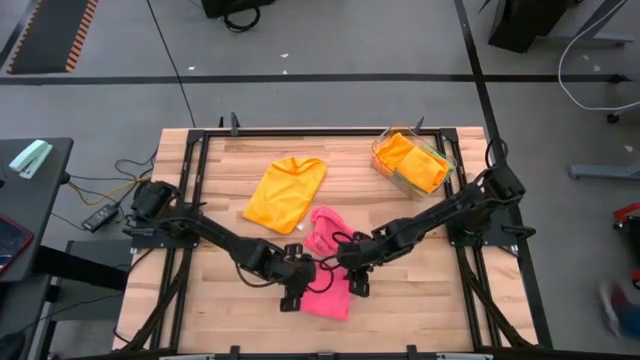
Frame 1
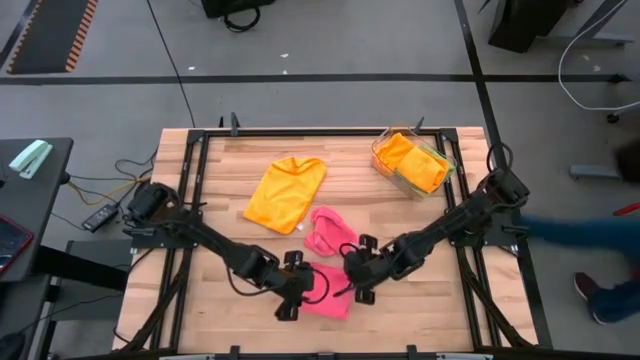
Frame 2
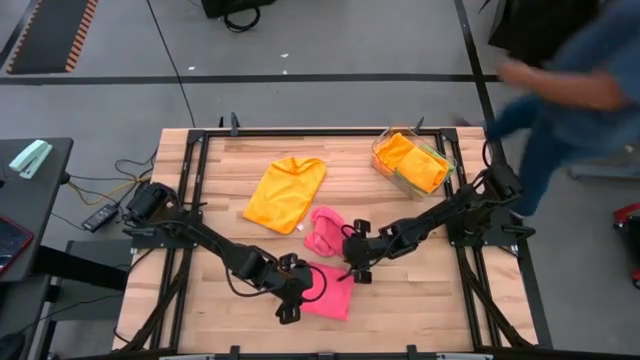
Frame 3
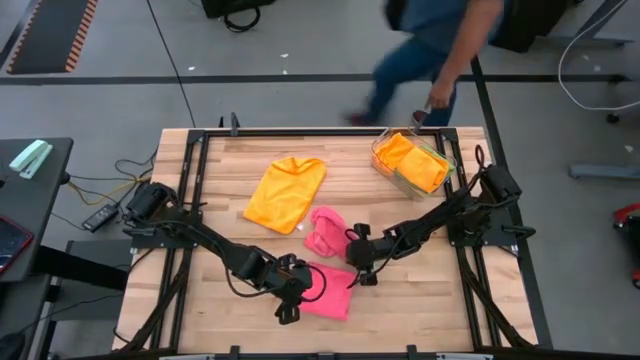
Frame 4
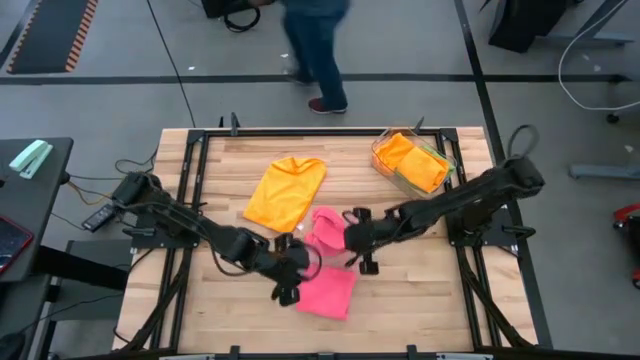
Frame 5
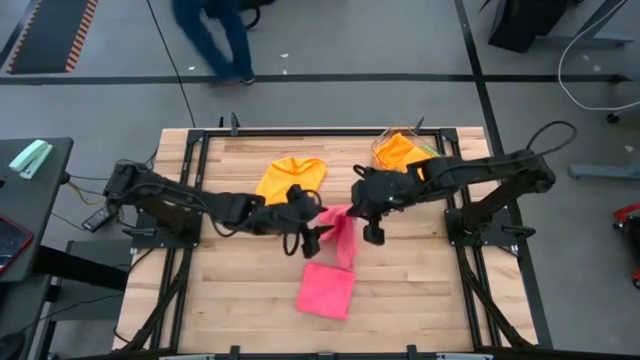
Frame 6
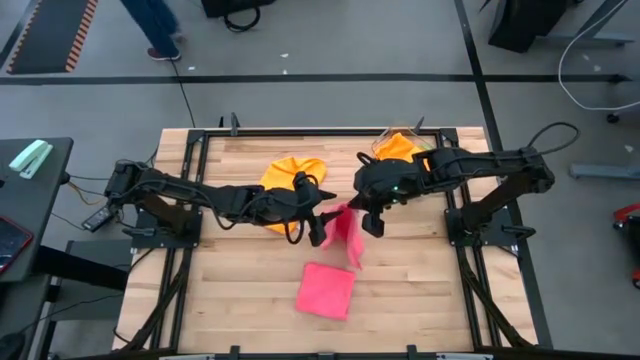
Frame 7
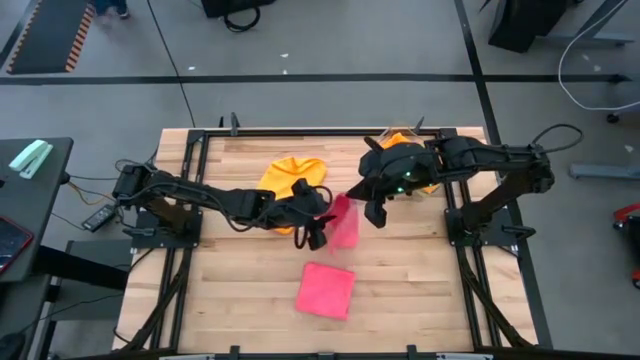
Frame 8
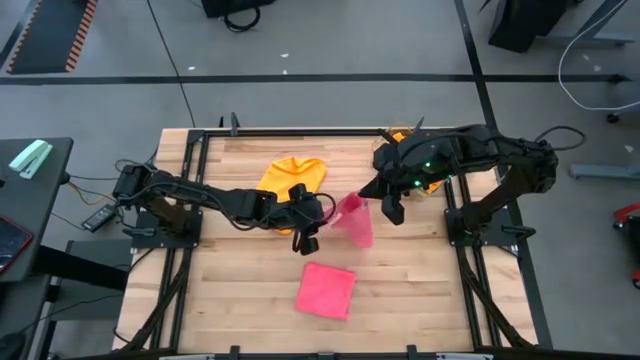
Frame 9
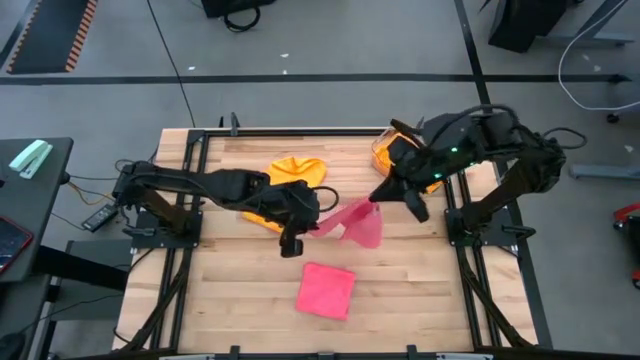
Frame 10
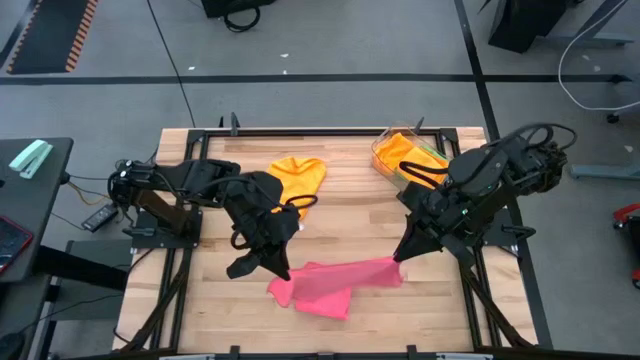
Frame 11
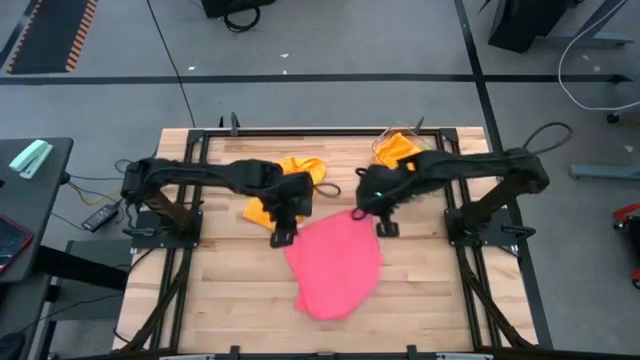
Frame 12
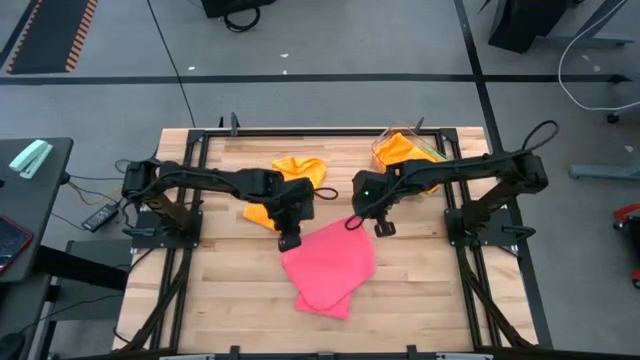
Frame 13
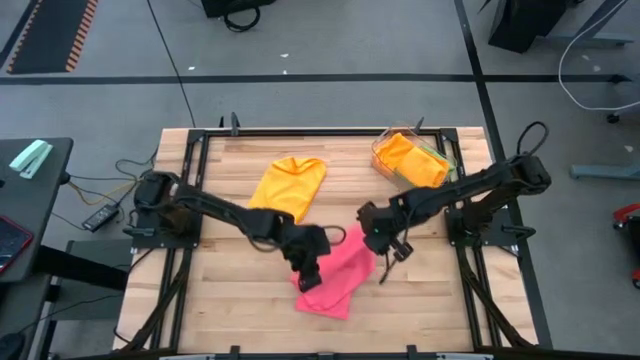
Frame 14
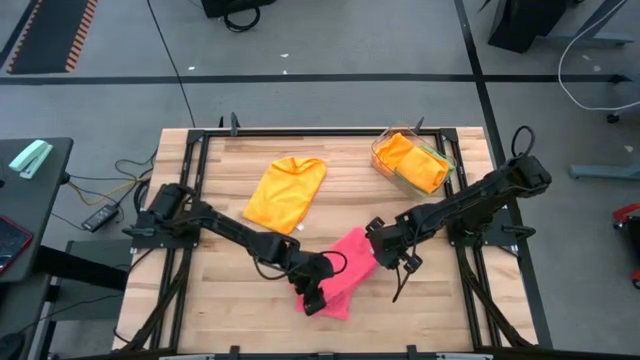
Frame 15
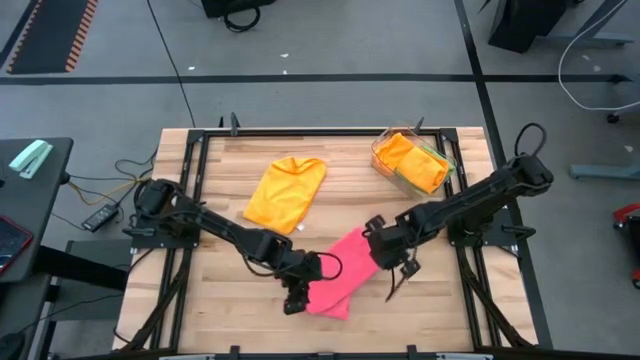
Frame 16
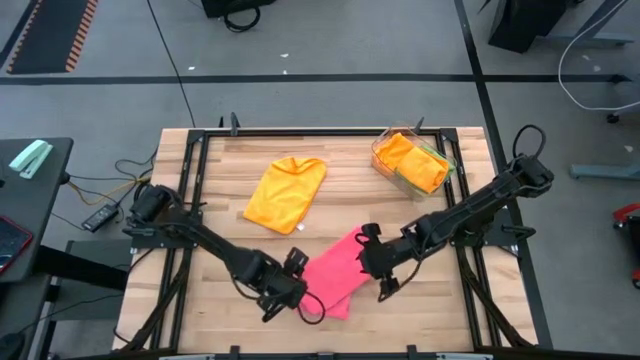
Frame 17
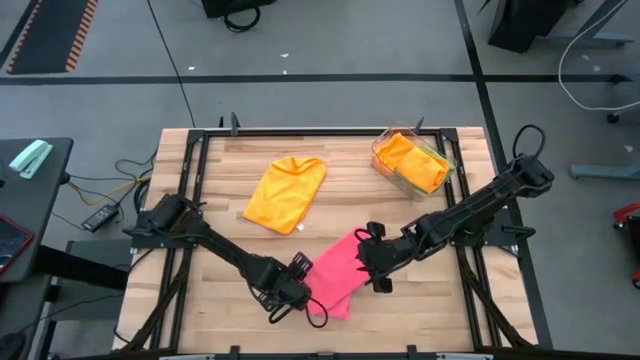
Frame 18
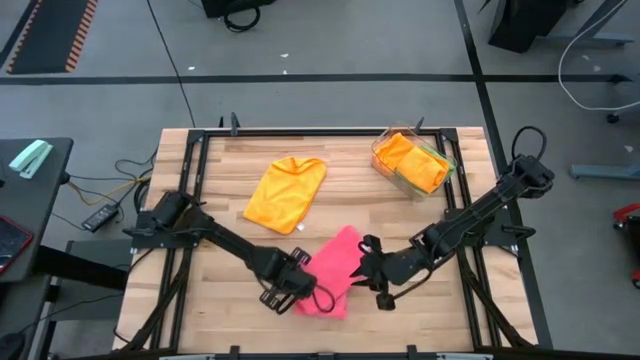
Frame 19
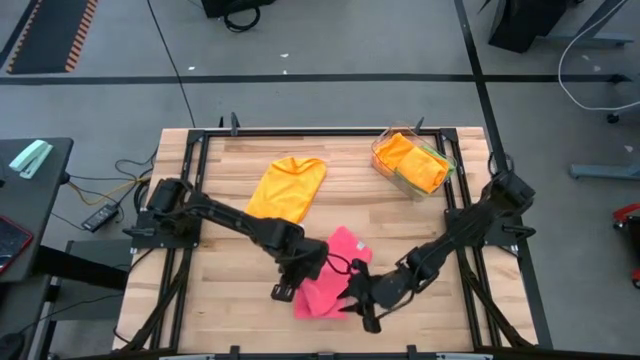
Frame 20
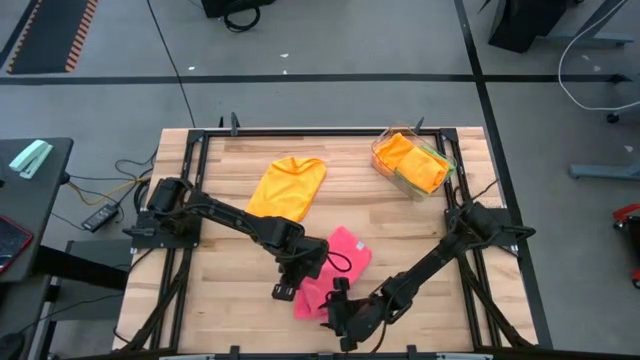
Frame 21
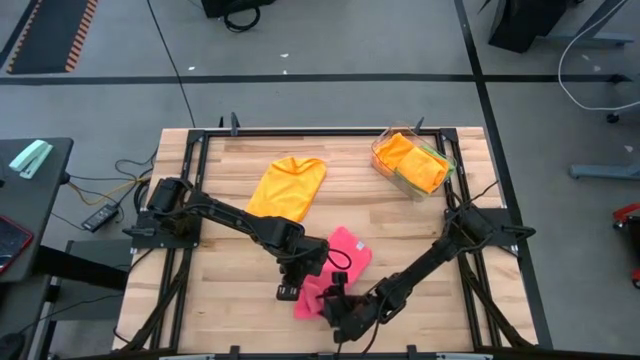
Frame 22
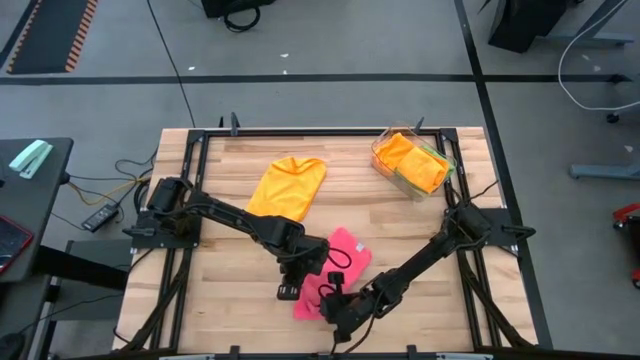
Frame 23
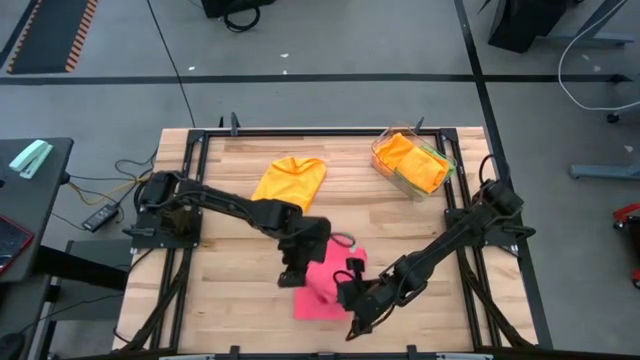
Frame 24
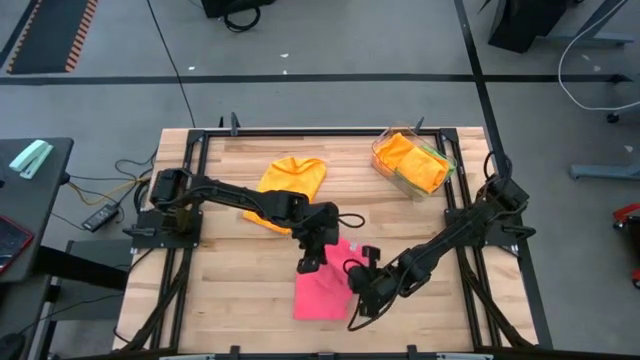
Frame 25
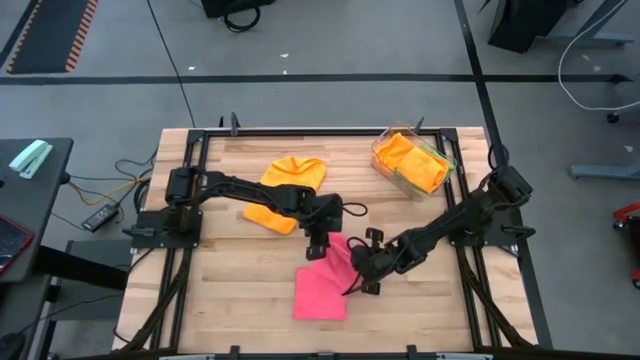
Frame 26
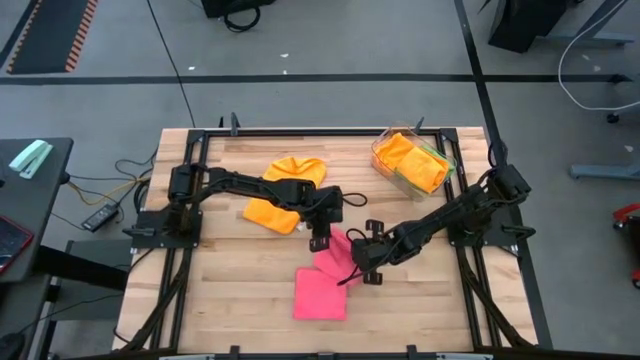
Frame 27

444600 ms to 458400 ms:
Task: Fold microfiber towels
Fold the right pink towel

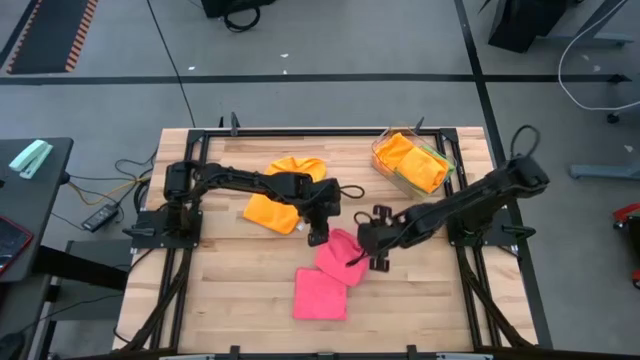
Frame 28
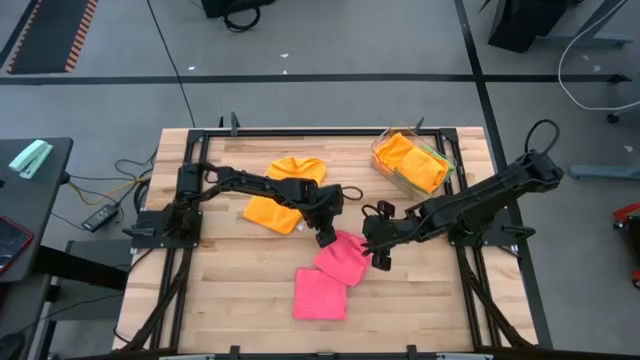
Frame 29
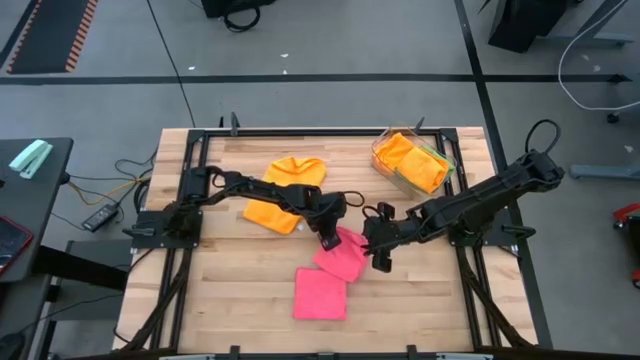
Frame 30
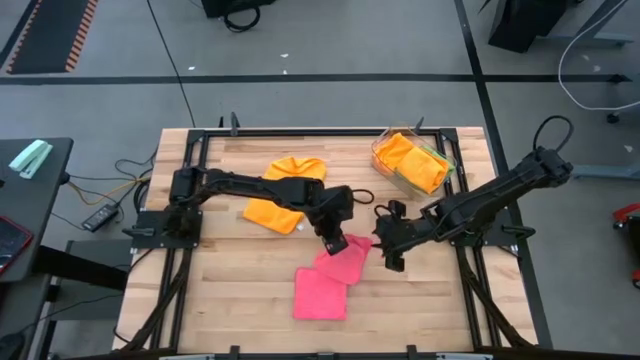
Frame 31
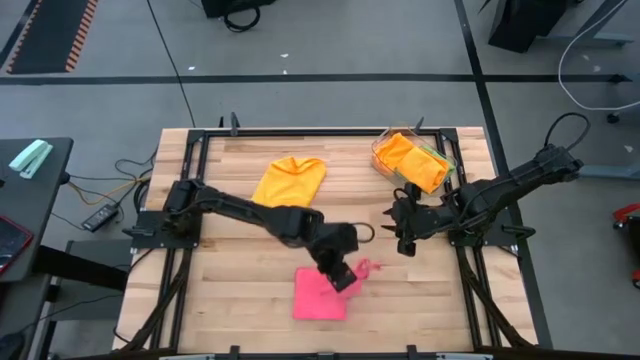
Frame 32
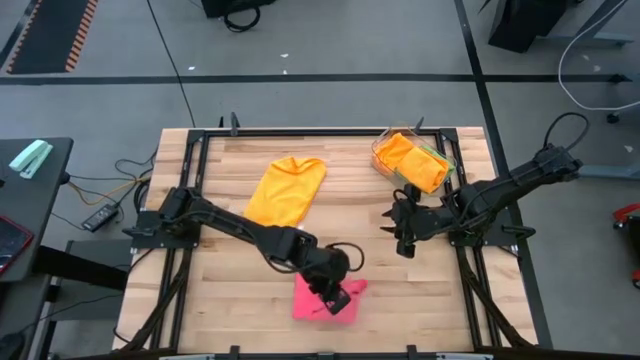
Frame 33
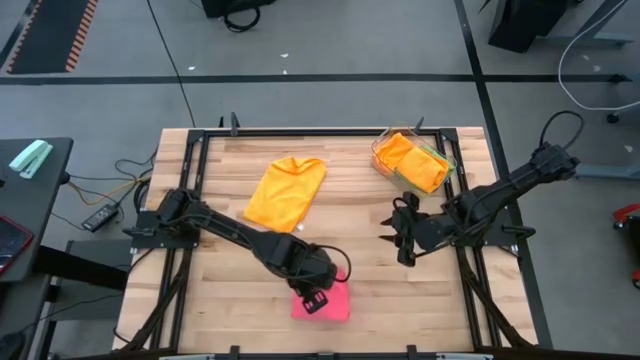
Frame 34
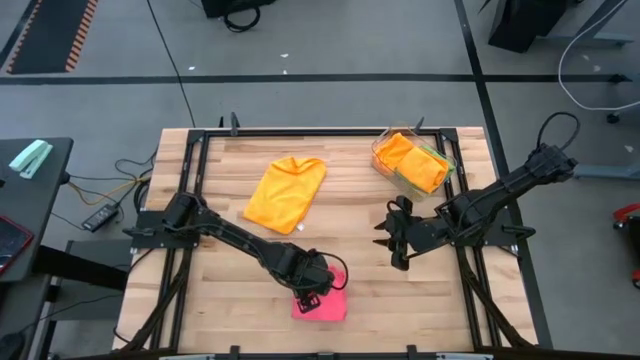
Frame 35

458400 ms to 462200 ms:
Stack the right pink towel on top of the left pink towel

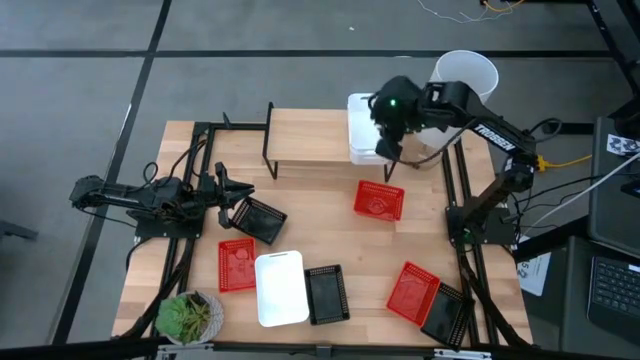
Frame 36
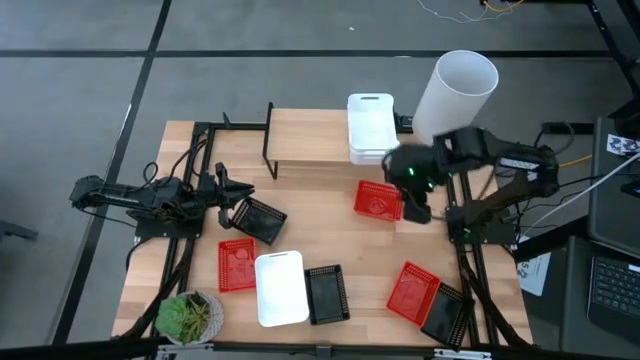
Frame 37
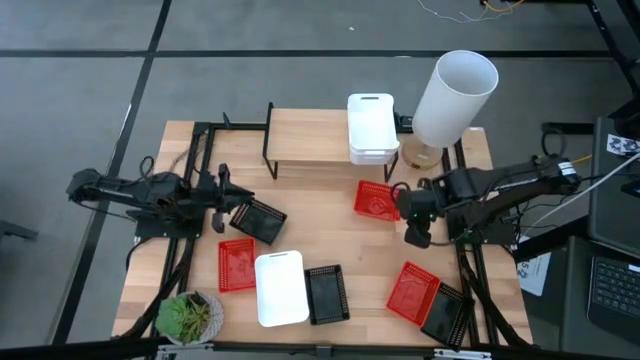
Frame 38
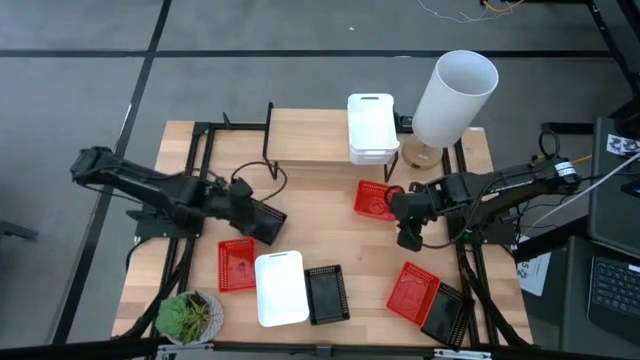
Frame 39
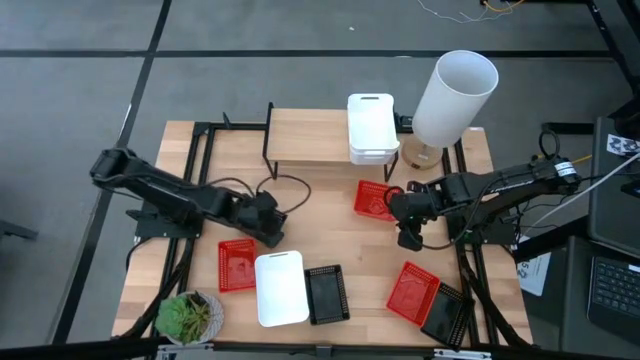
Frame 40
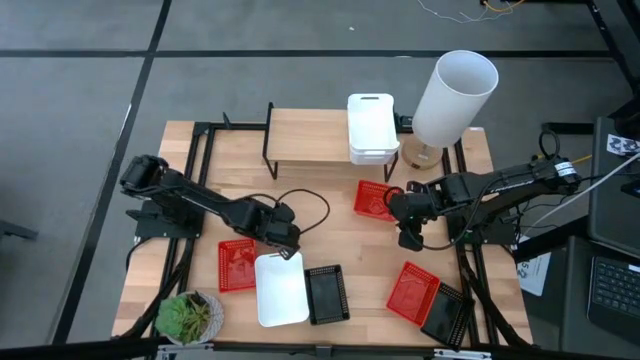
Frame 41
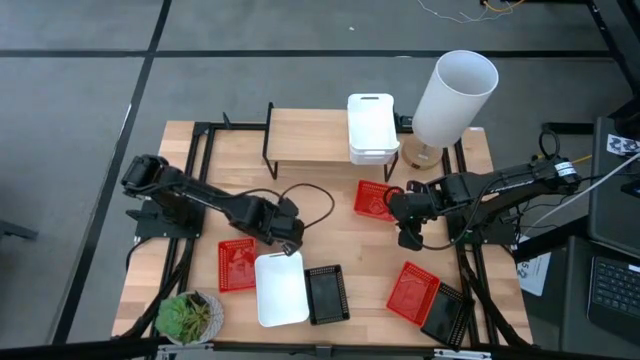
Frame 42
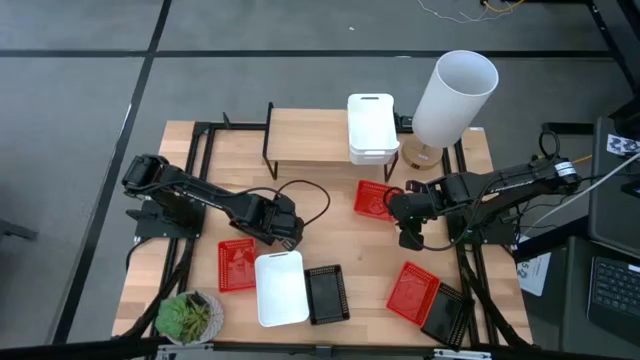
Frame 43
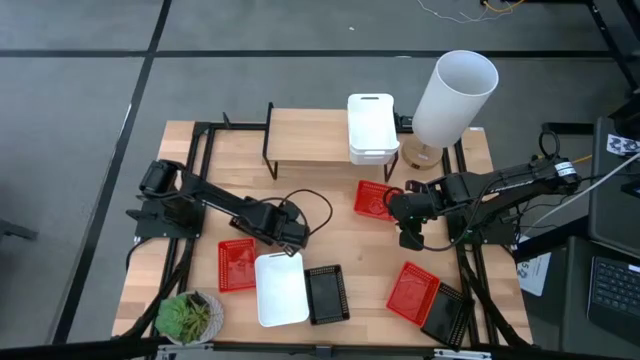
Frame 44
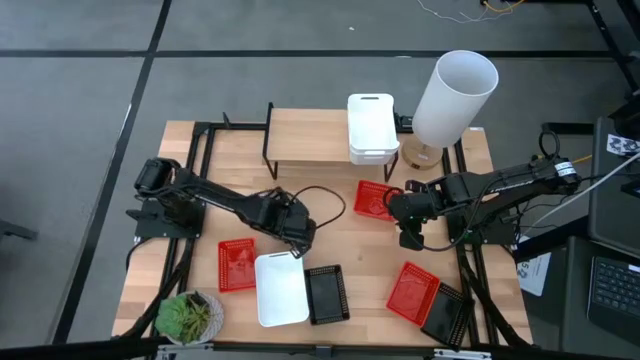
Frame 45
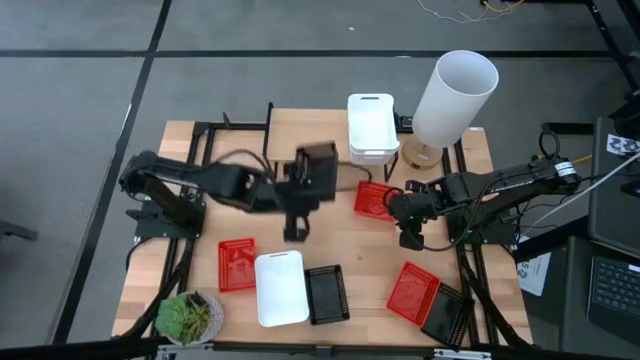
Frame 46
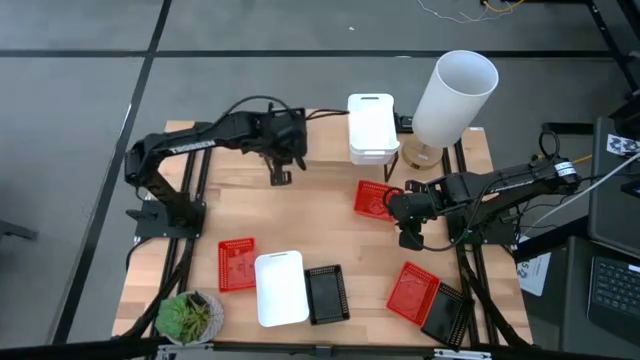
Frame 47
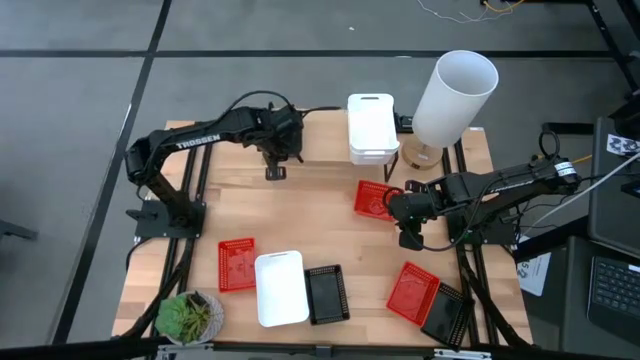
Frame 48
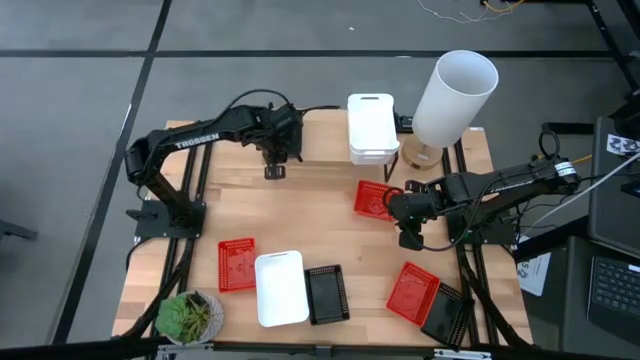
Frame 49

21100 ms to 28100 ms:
Task: Stack baskets on shelf by color
Put the top black bin on the shelf
